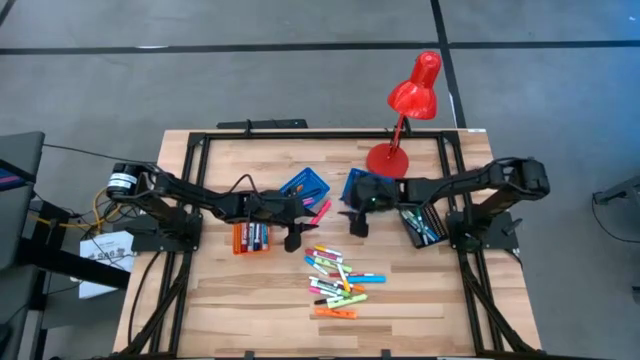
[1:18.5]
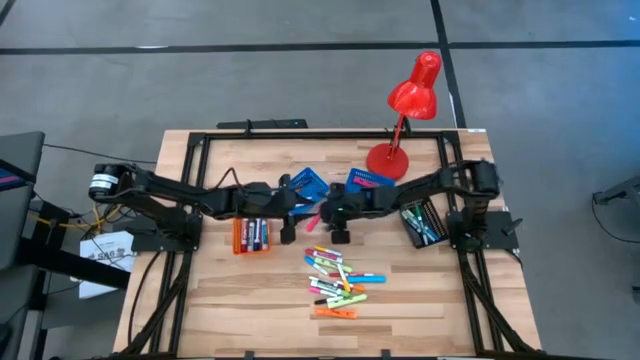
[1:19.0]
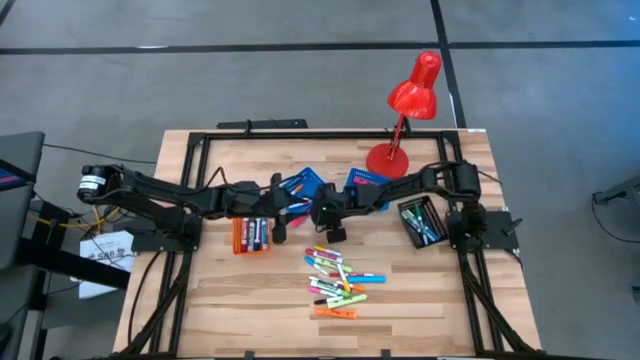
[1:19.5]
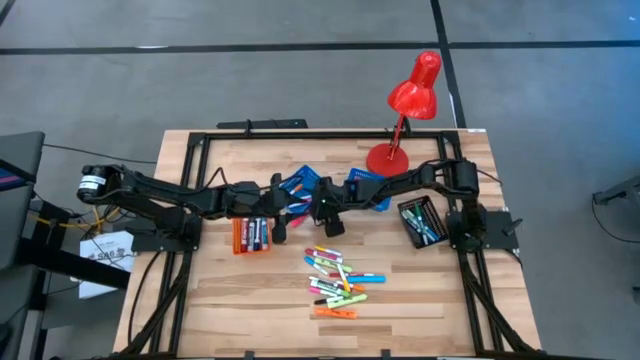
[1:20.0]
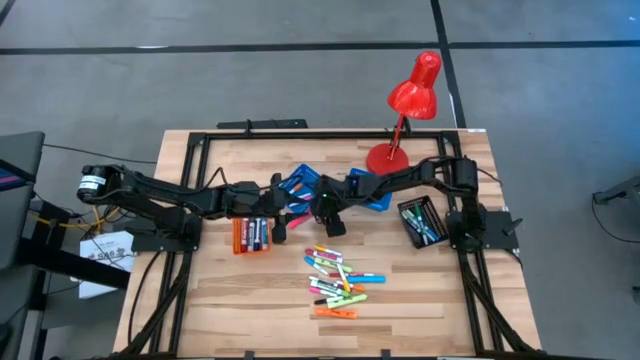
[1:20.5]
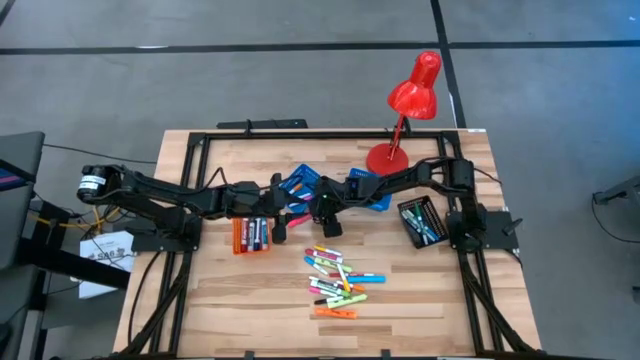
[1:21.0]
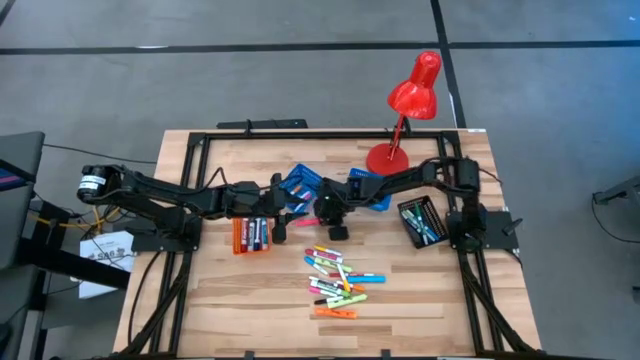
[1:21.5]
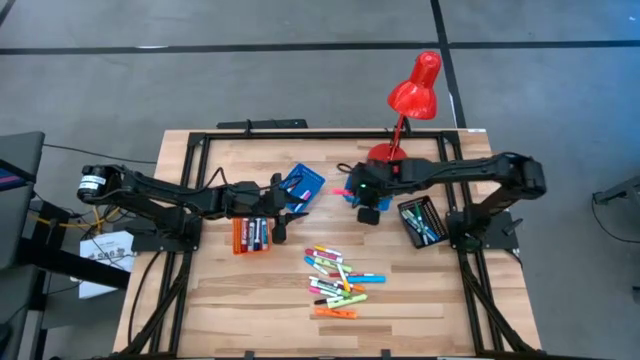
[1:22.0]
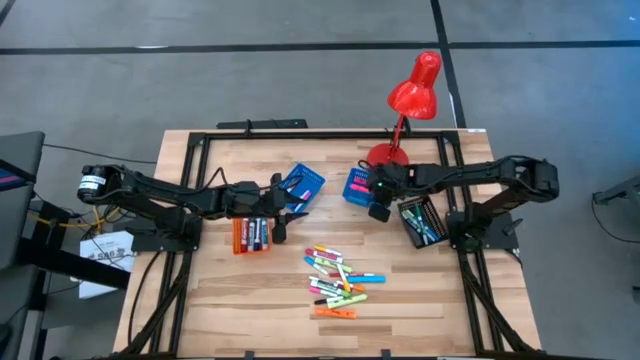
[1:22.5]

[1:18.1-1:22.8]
Task: Pick & Place Markers
Put the large pink highlighter pen into the right blue bin

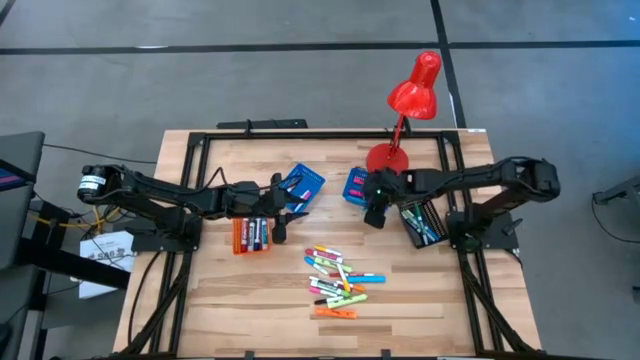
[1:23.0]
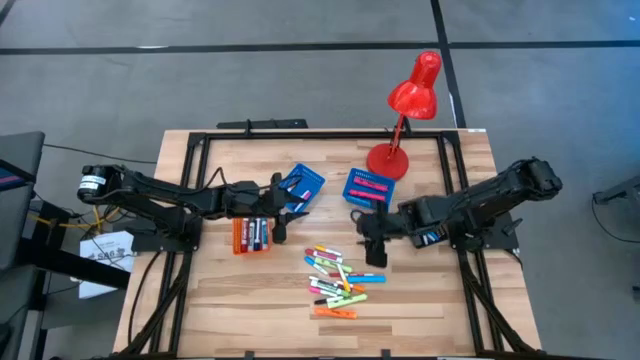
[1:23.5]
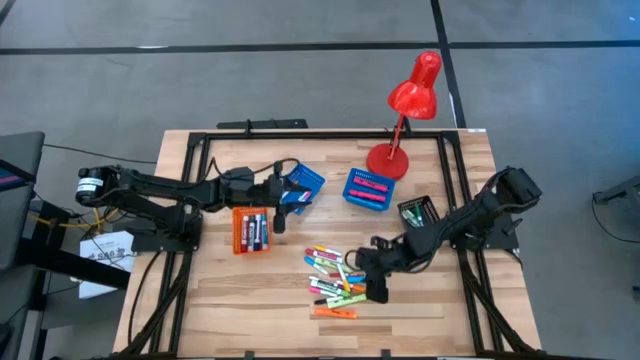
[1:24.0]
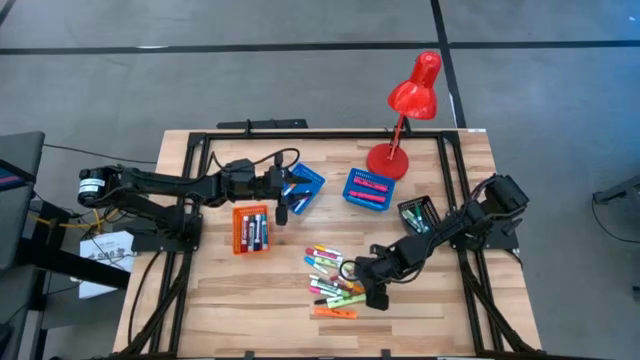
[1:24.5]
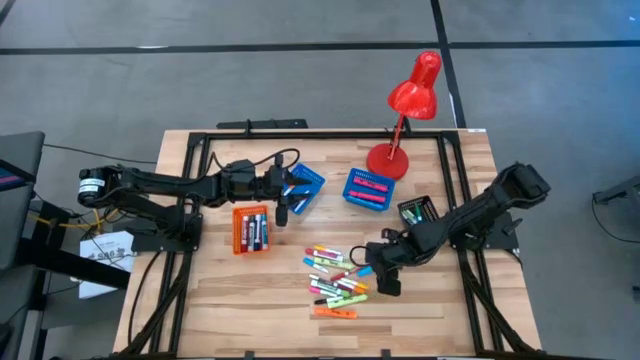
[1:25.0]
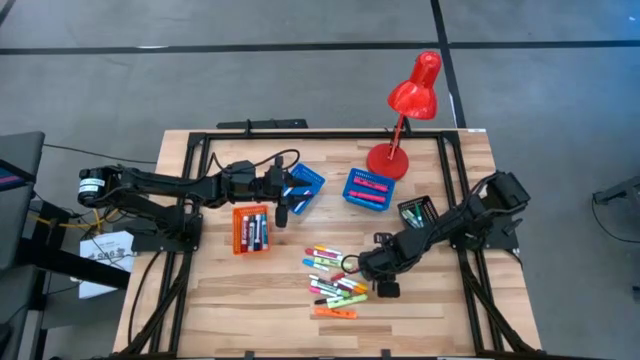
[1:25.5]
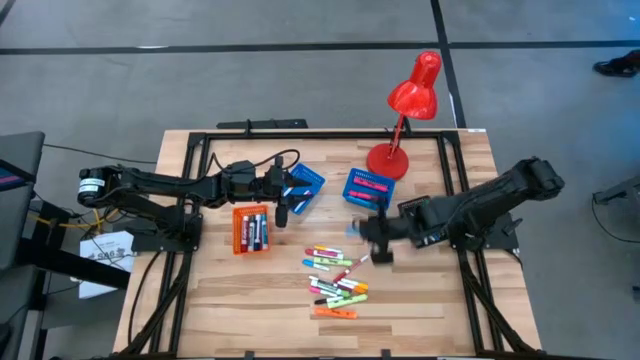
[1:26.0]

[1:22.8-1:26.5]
Put the large light blue highlighter pen into the right blue bin

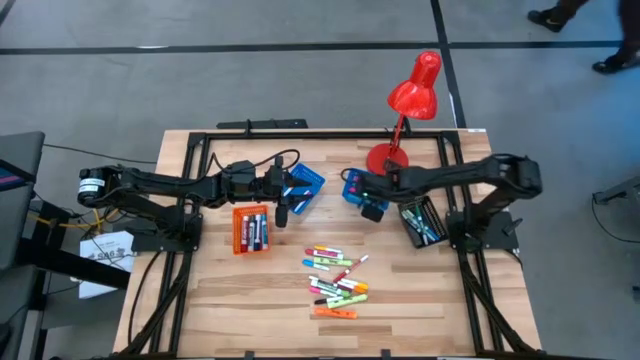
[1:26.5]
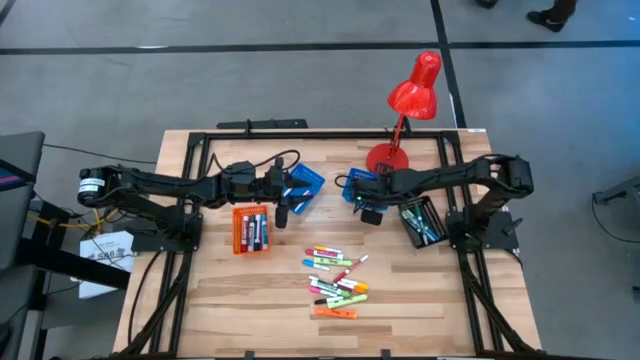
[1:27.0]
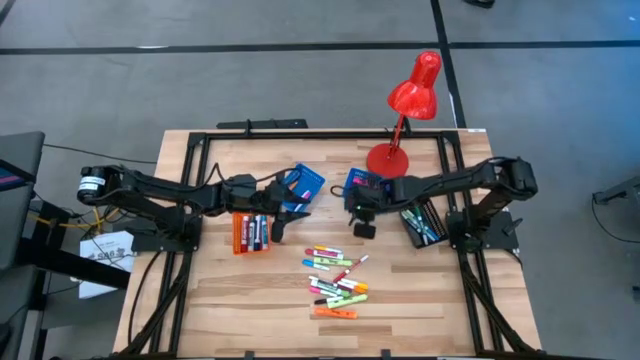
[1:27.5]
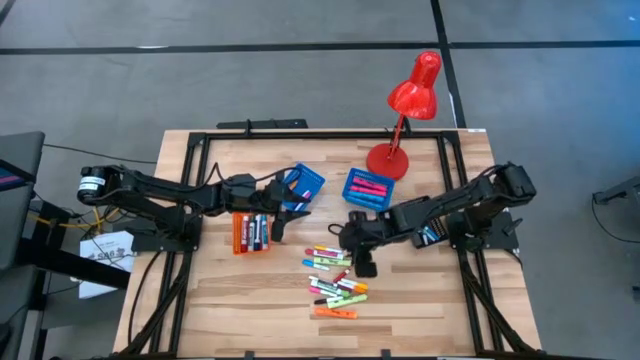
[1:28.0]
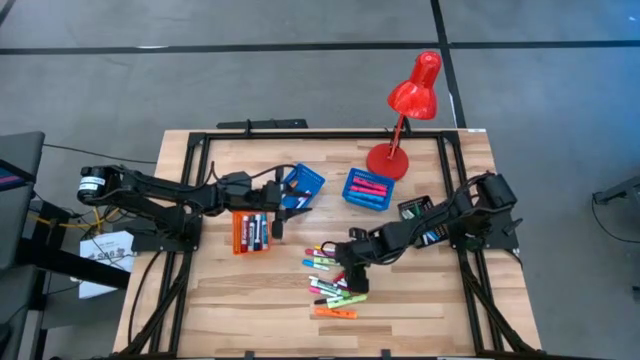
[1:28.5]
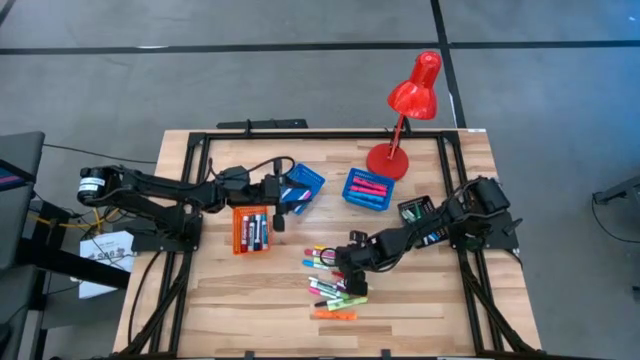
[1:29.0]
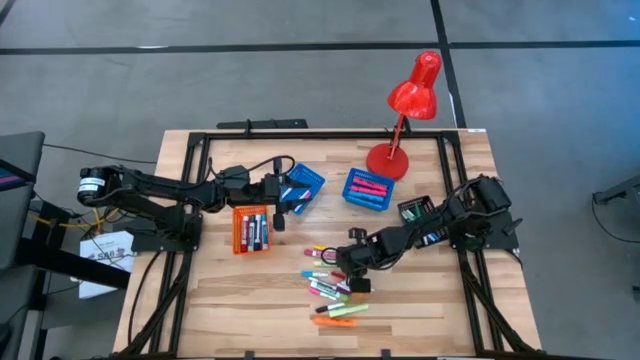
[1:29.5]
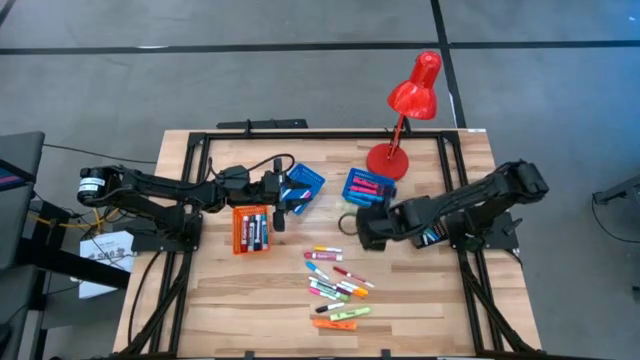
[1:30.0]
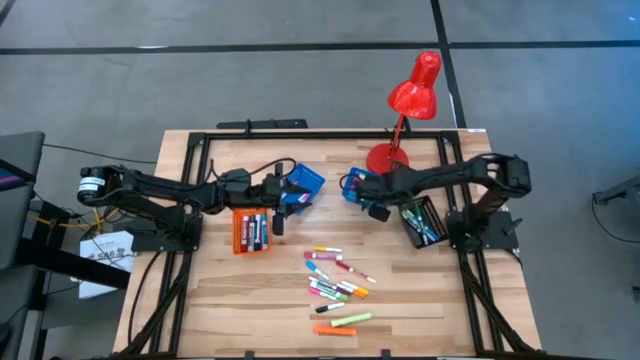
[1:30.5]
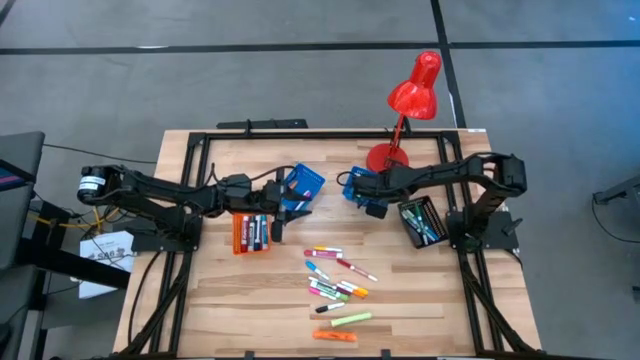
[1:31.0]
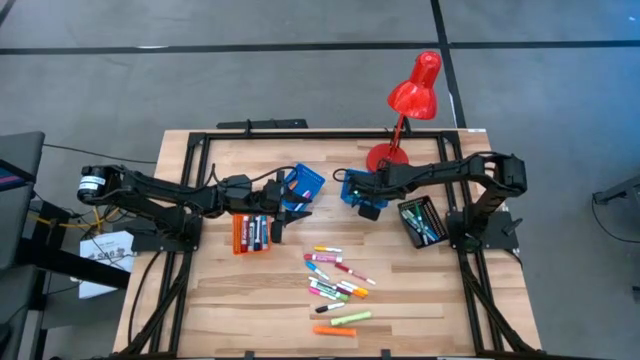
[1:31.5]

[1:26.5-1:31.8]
Put the top large light green highlighter pen into the right blue bin

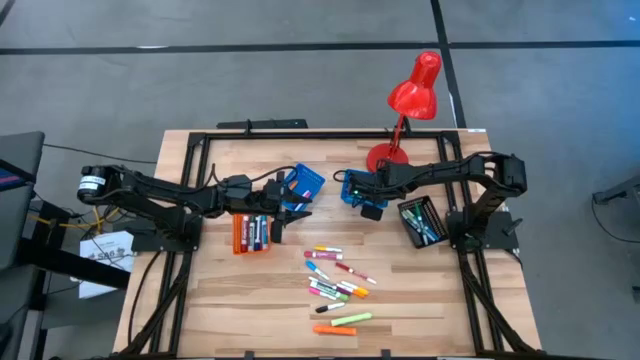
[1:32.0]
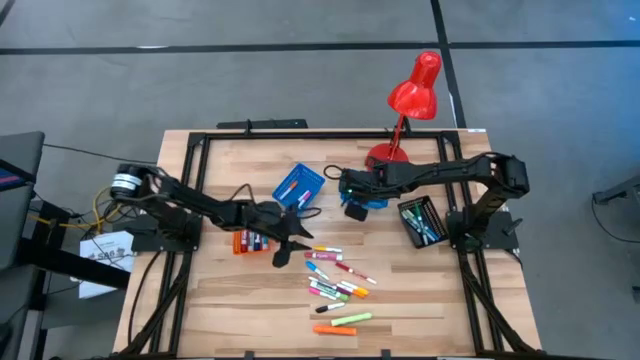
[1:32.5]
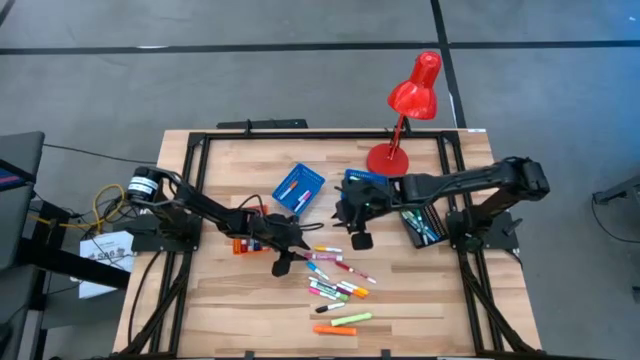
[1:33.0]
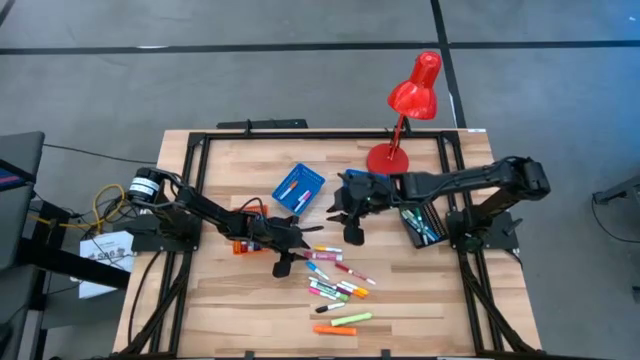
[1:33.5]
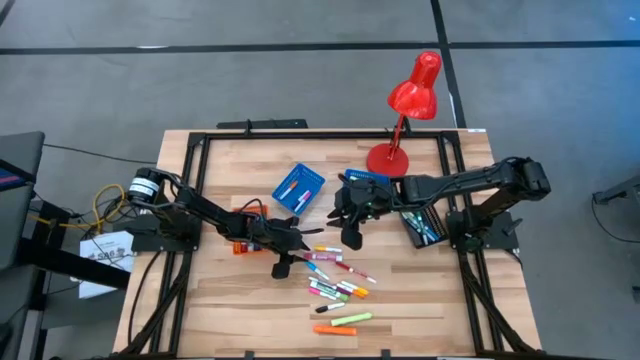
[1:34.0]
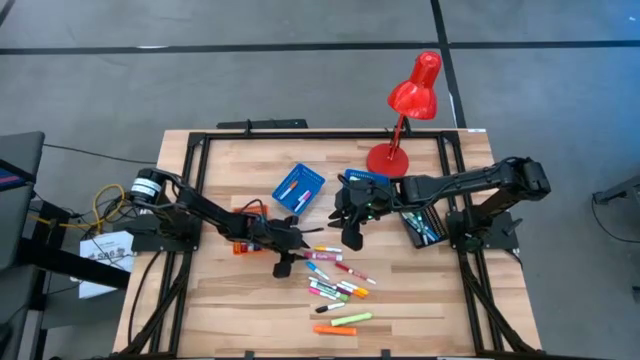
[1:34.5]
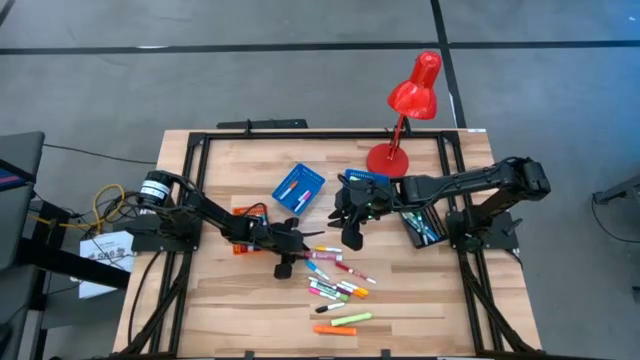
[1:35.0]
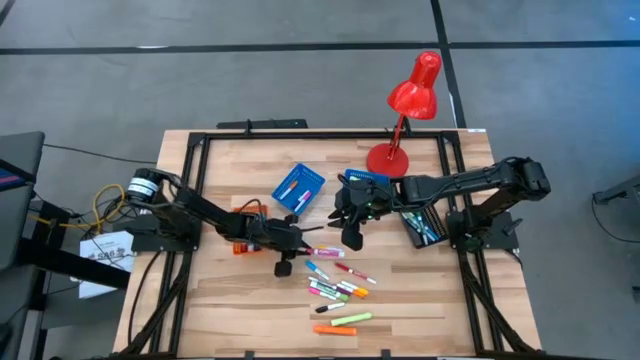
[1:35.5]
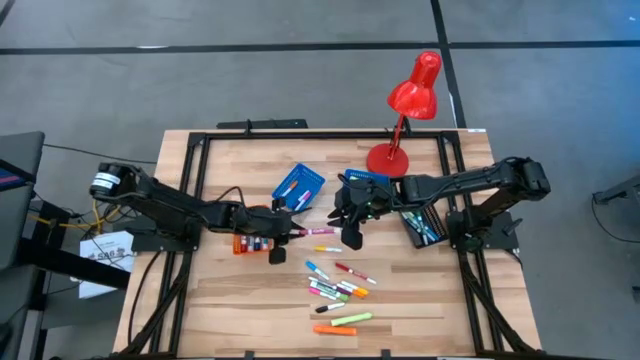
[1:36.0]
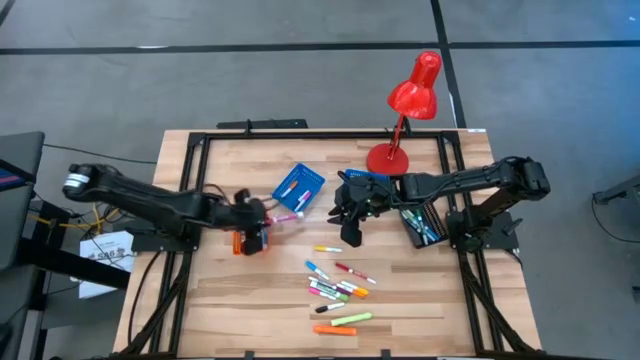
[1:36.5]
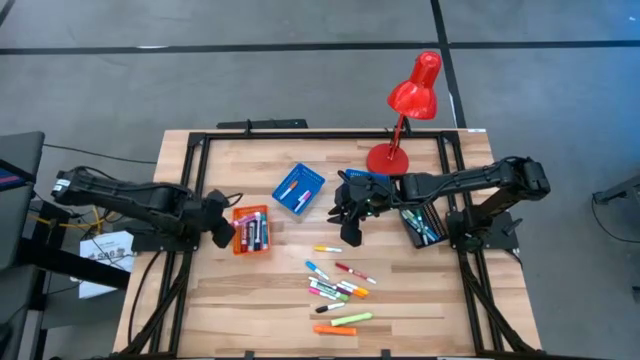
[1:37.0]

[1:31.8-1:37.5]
Put the large pink marker pen into the orange bin

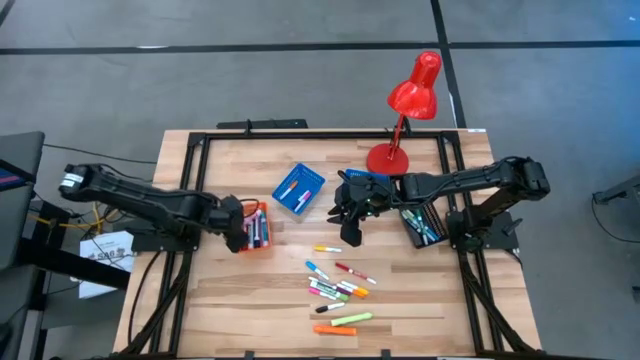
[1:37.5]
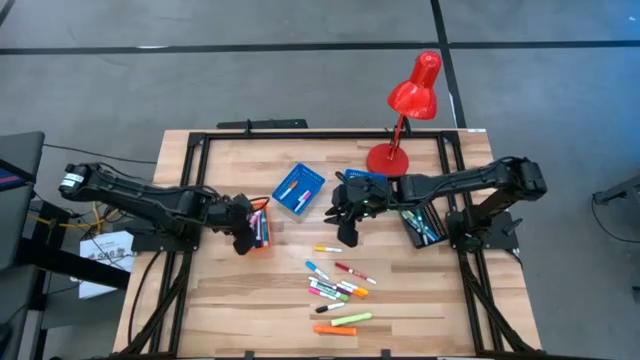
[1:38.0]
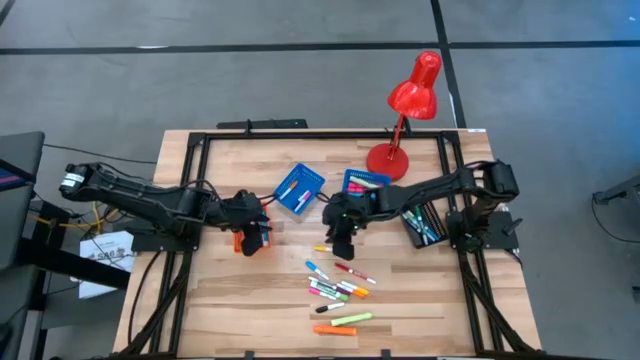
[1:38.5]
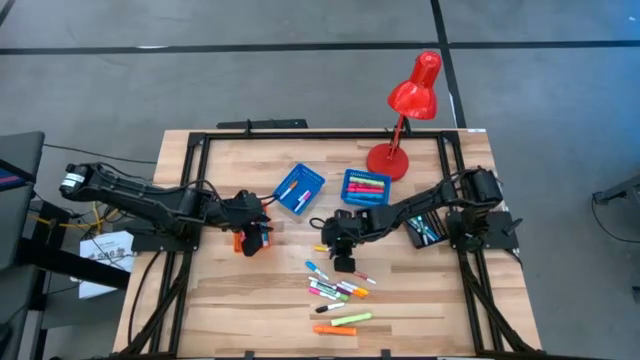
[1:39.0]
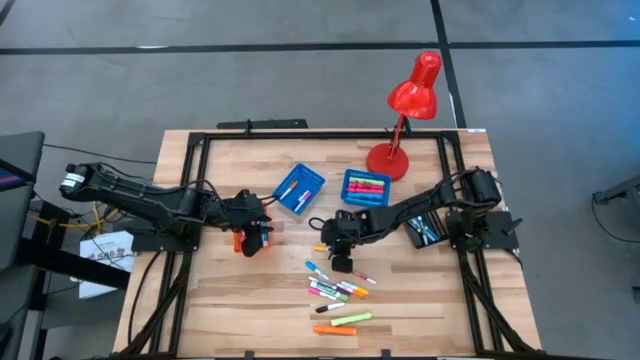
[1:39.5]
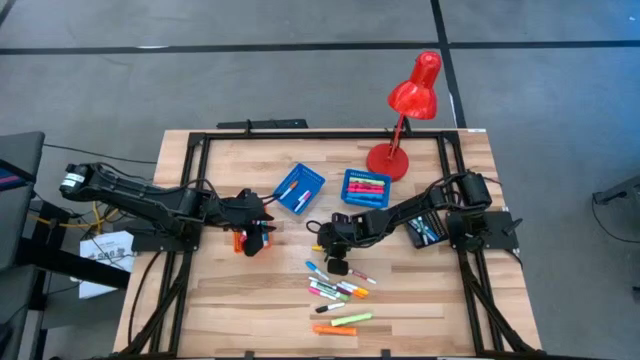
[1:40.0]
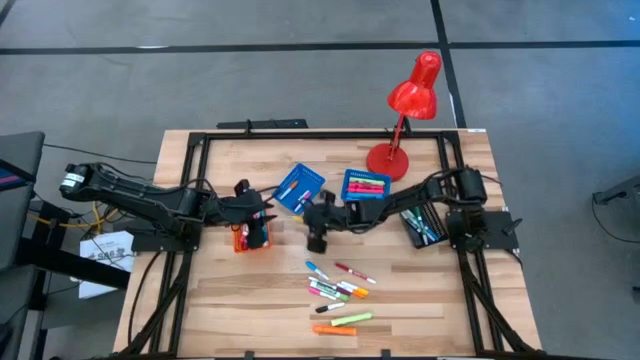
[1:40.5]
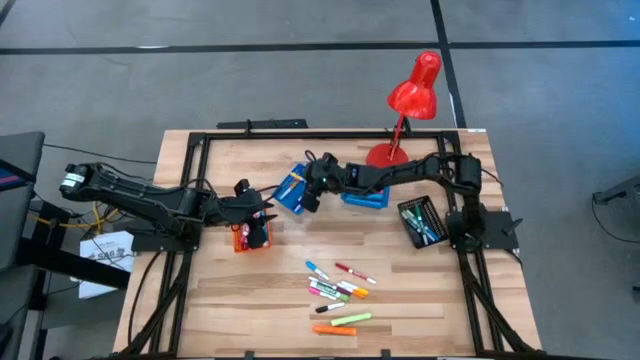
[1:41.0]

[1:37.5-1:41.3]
Put the top small yellow highlighter pen into the left blue bin
